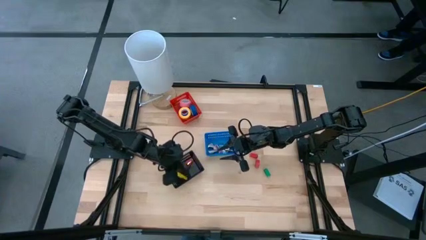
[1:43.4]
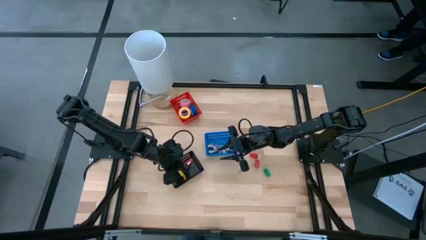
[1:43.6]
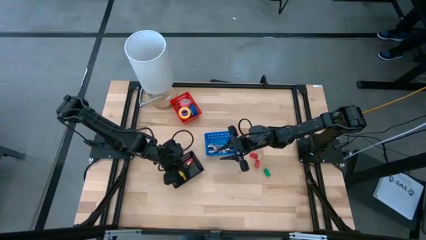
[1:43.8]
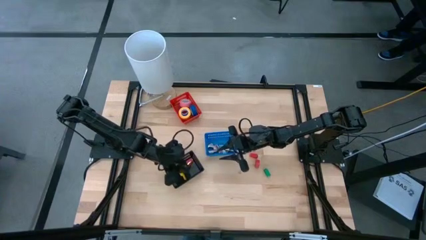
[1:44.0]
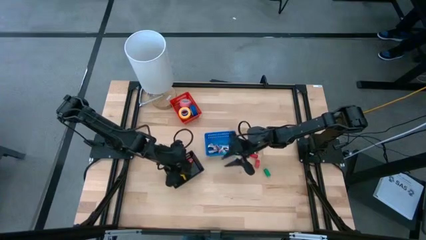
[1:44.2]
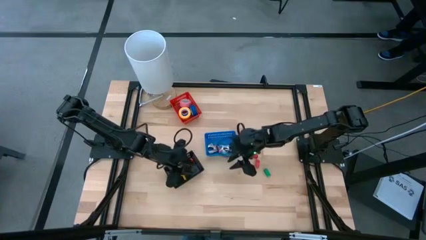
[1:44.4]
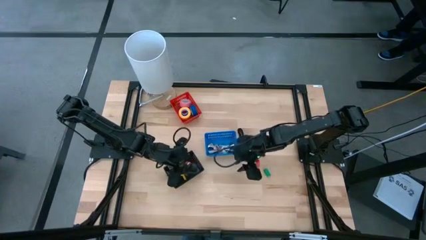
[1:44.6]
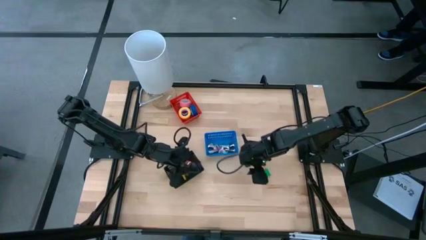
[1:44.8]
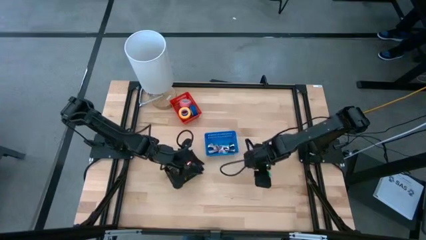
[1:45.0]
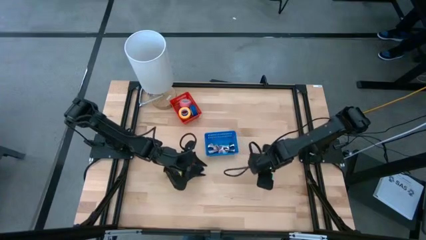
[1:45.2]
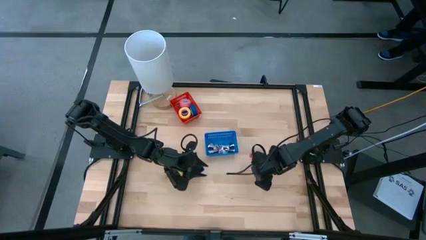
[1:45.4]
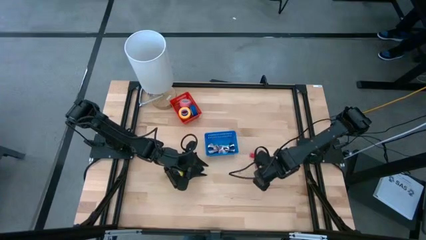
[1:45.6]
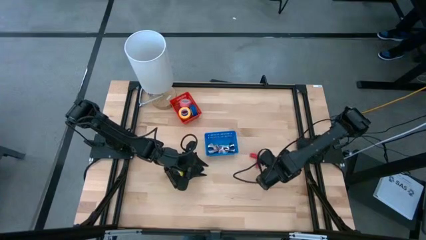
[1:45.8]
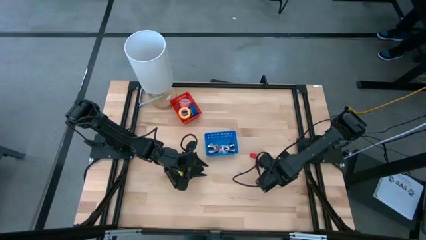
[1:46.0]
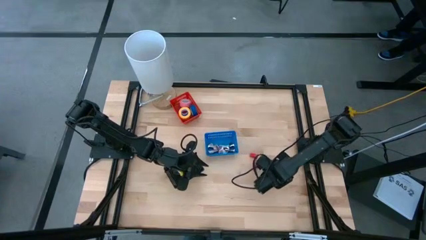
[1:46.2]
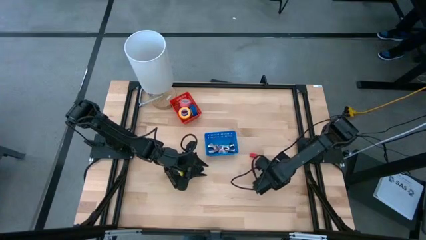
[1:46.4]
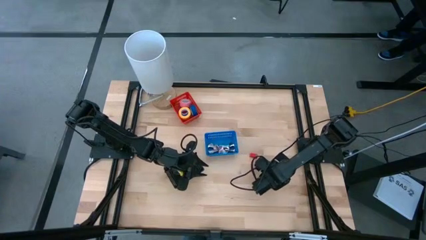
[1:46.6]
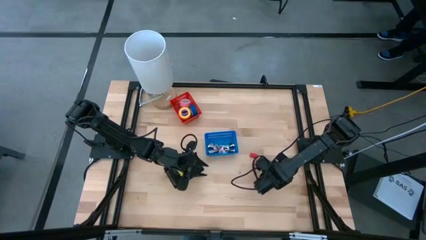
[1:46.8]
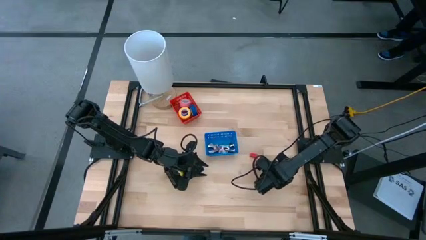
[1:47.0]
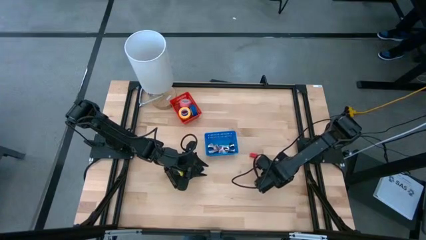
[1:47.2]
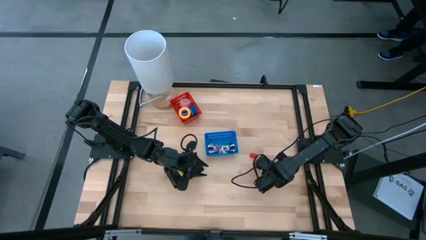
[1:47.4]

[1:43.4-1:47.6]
Task: Pick and place Stapler, Stapler remover, tape
Put the green stapler into the black basket

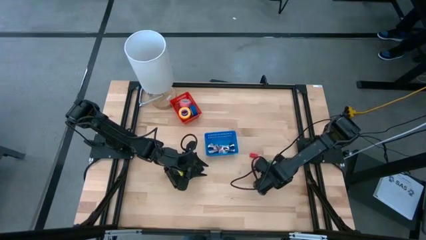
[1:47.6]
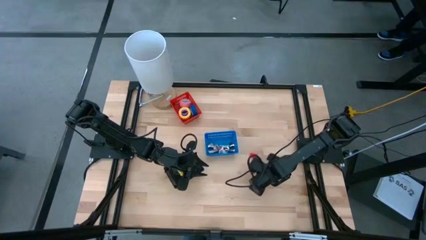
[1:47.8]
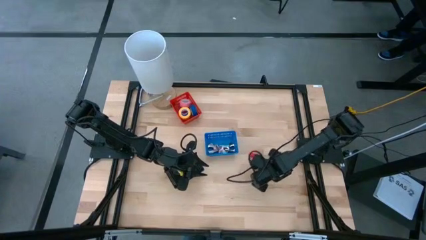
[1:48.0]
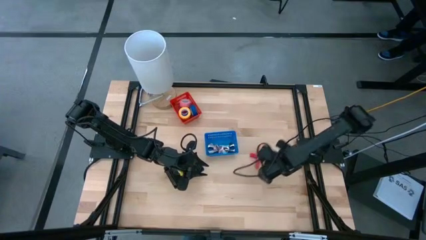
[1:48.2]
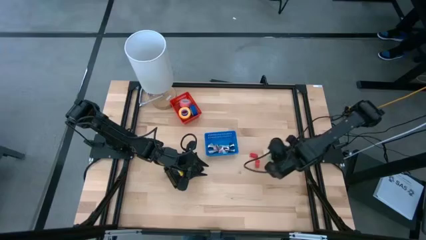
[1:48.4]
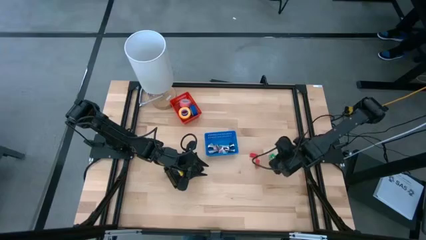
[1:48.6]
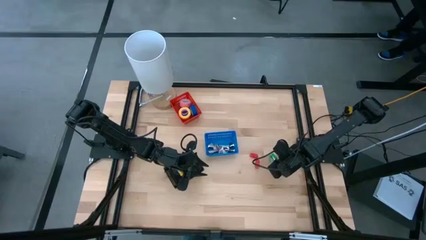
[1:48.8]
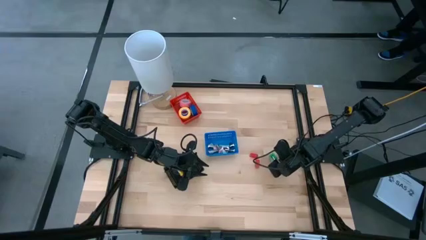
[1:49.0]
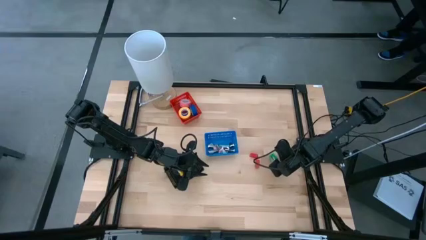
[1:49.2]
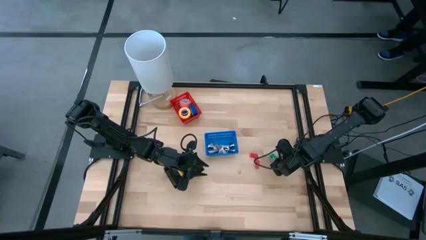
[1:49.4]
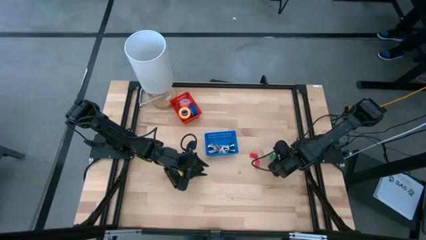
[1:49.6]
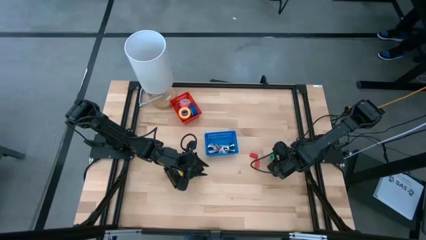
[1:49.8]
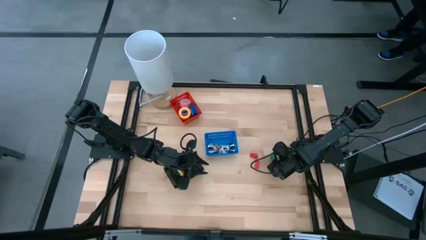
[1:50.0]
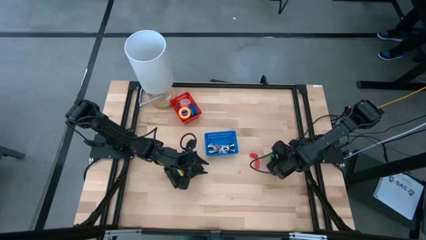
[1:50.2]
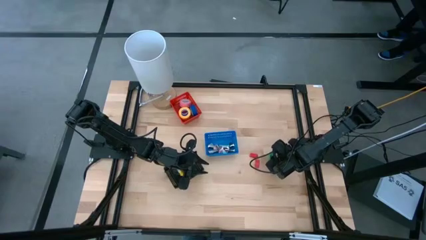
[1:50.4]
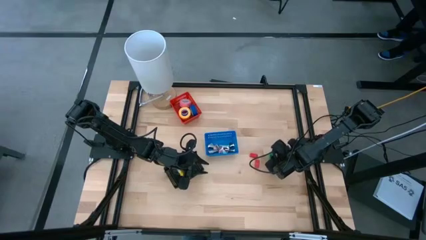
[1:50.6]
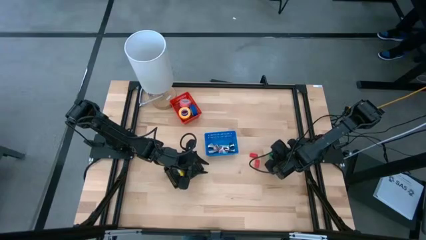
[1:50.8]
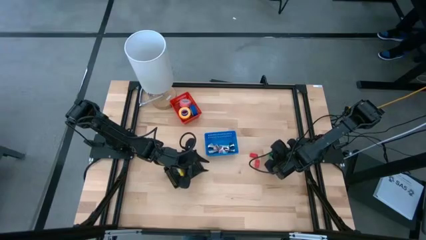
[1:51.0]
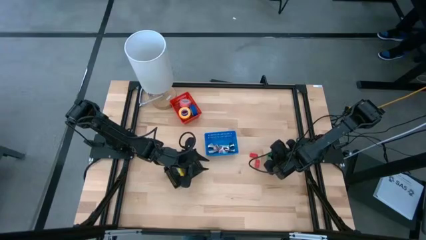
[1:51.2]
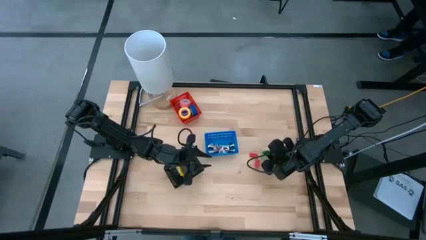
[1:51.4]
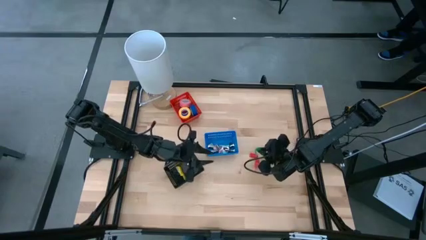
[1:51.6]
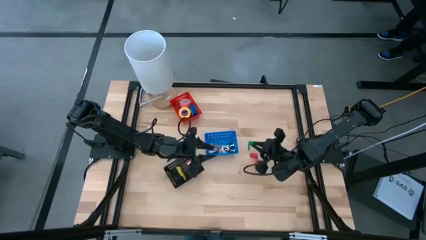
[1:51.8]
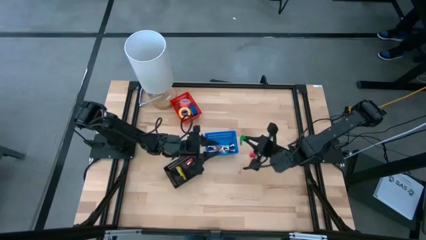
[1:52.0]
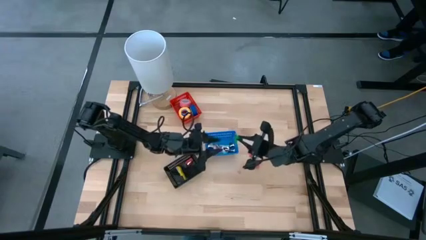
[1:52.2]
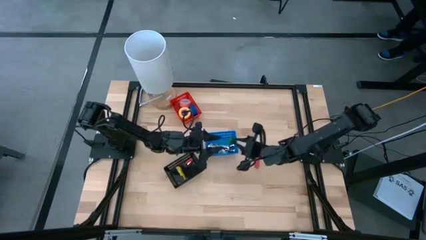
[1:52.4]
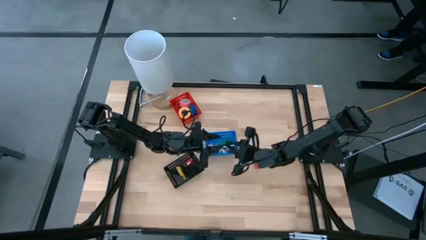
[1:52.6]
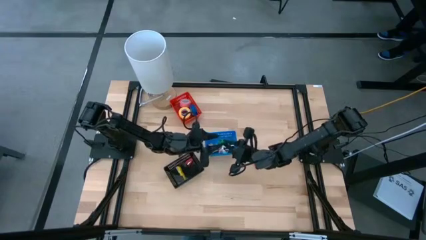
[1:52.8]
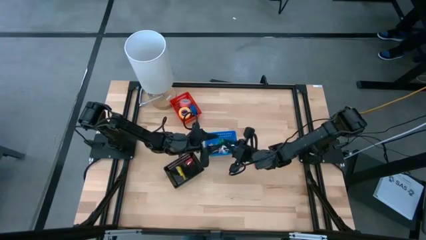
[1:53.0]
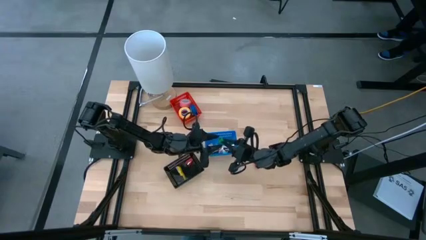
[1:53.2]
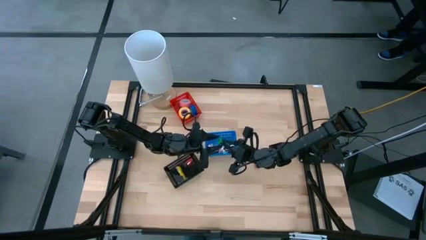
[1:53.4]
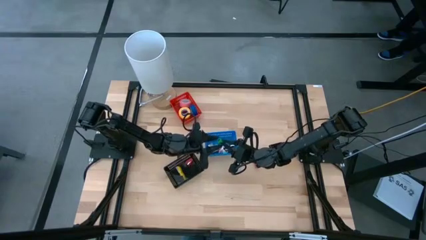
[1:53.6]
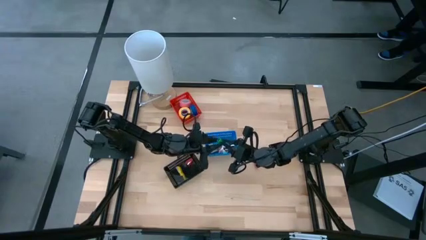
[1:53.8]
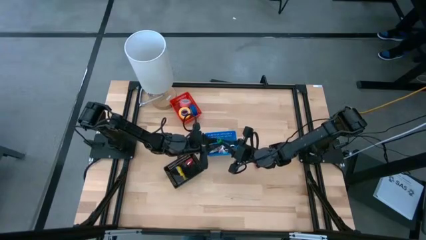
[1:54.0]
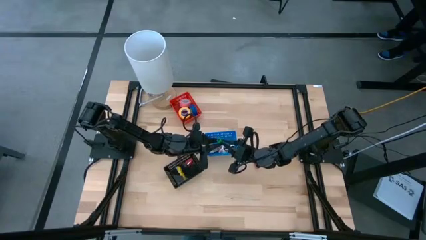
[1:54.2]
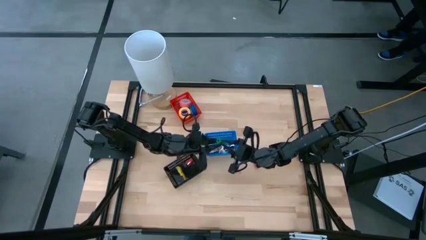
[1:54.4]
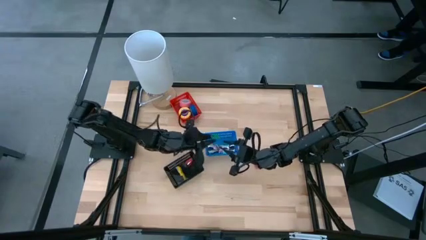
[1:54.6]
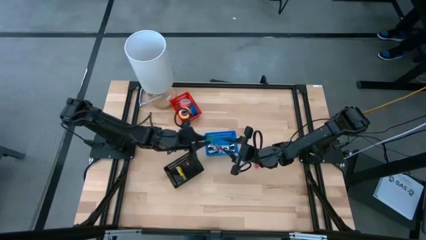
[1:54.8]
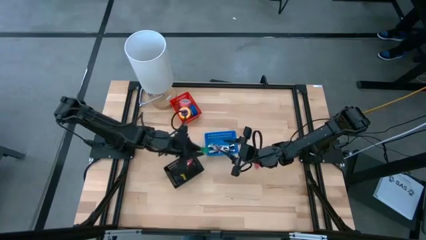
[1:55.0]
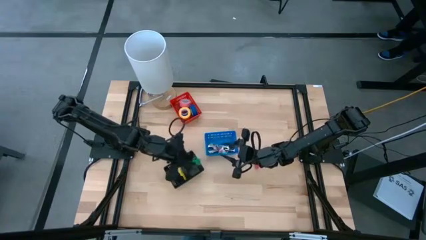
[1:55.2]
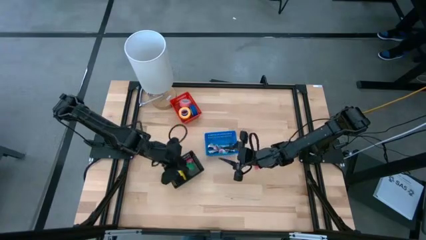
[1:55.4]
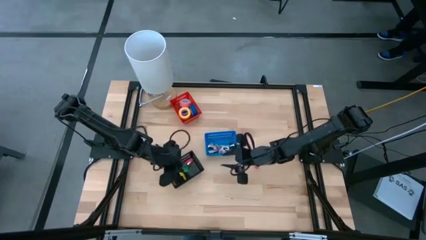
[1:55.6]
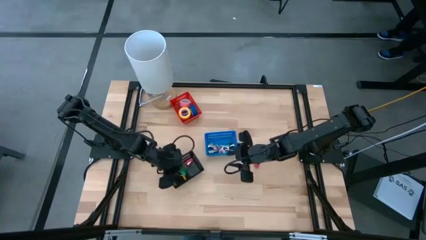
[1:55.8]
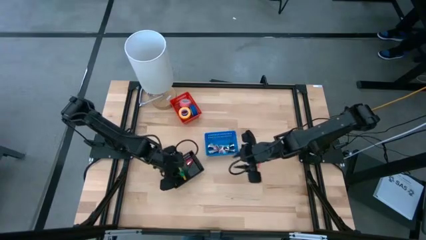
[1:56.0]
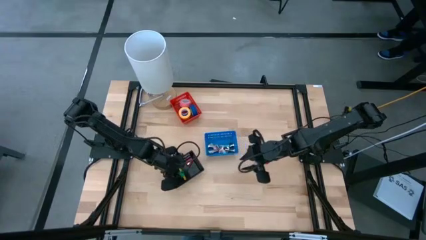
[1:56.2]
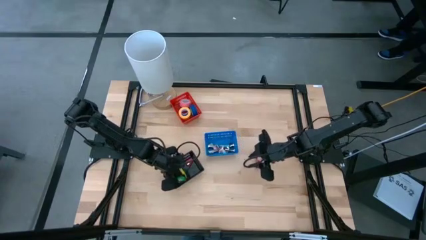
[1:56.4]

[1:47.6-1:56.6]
Put the green stapler into the black basket

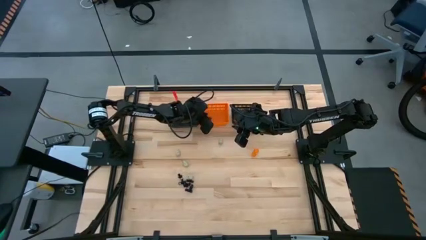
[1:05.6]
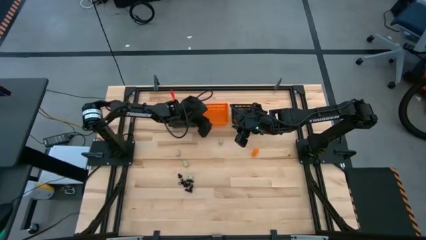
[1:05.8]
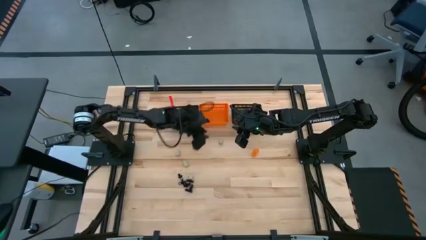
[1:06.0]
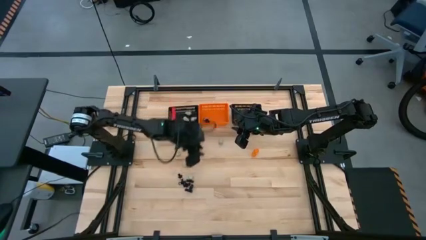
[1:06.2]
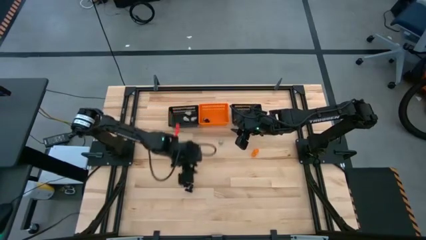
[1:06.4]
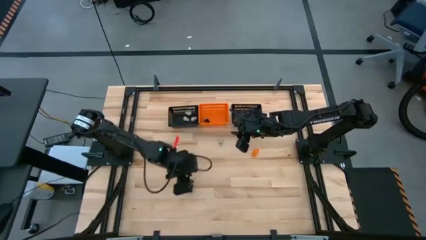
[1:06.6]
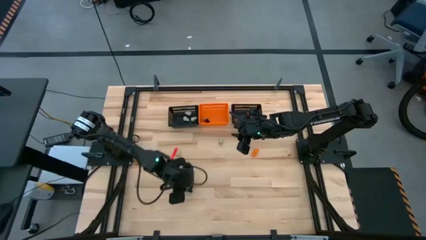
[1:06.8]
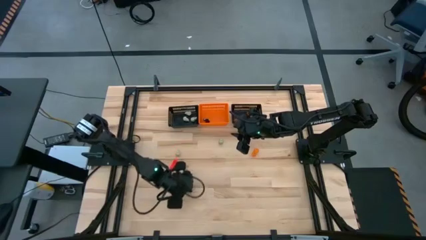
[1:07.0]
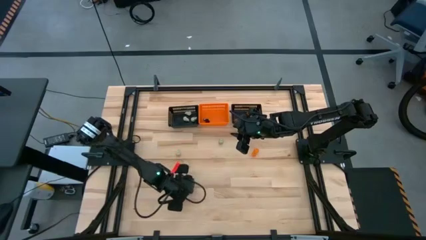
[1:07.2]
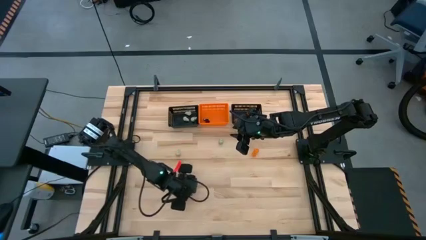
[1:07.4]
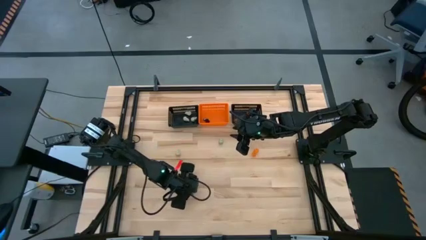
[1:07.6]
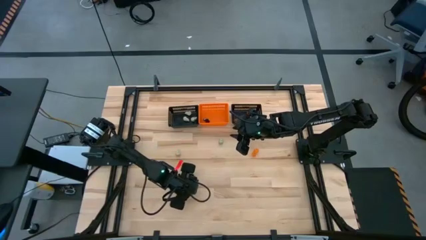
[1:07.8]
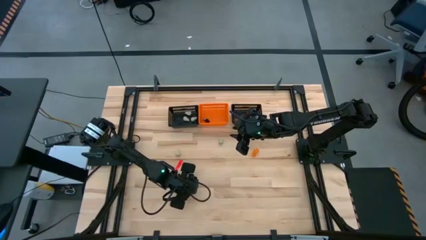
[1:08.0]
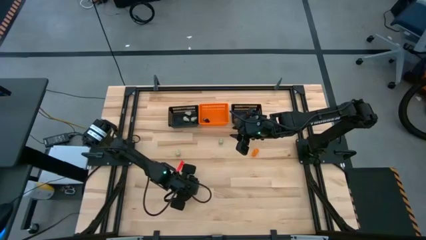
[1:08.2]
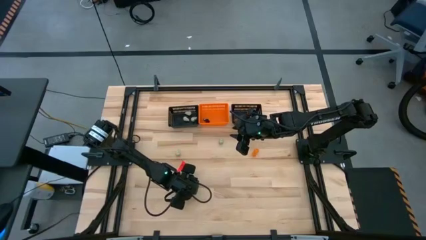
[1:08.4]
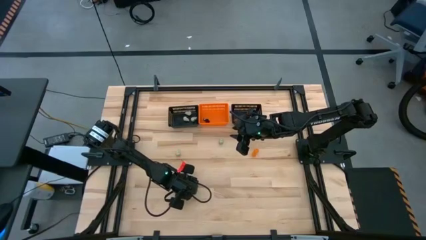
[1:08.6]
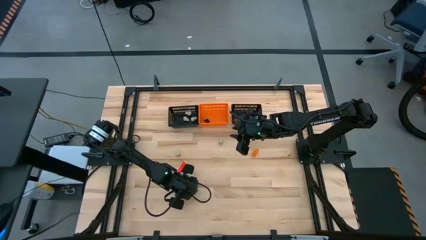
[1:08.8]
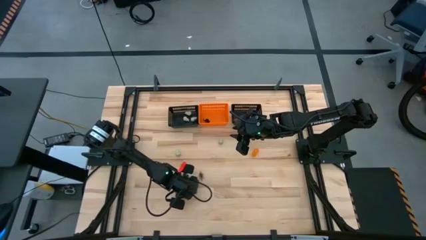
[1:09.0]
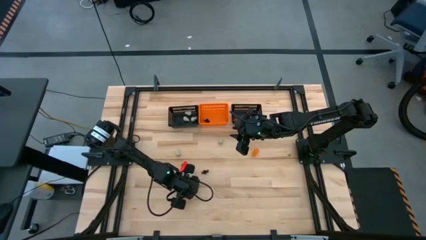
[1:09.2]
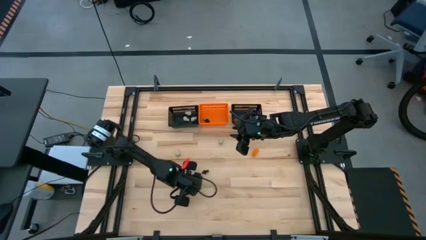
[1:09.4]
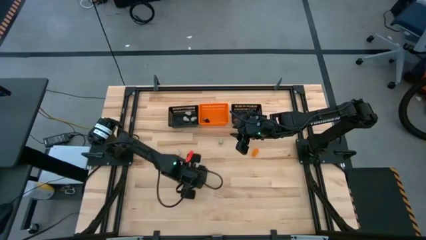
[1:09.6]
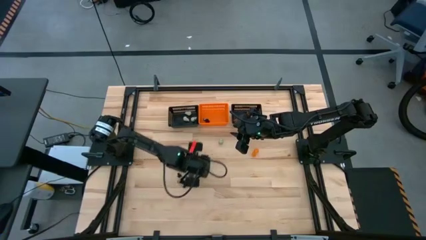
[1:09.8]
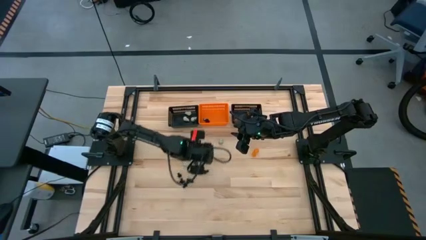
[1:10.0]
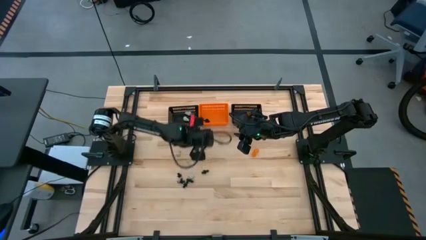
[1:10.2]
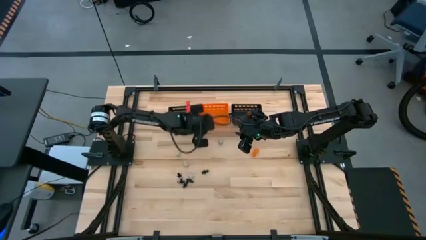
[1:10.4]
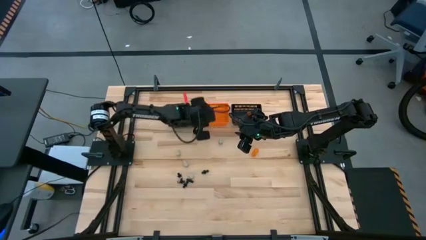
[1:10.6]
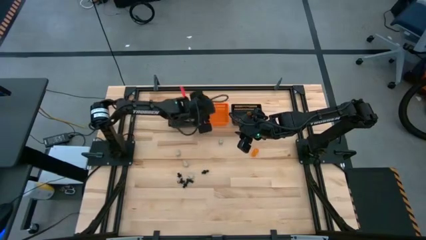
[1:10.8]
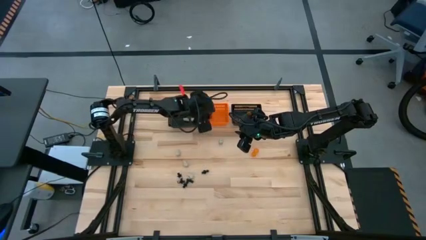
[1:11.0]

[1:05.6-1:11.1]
Task: Sort Halloween decoration
Put the black skeleton toy into the orange bin
